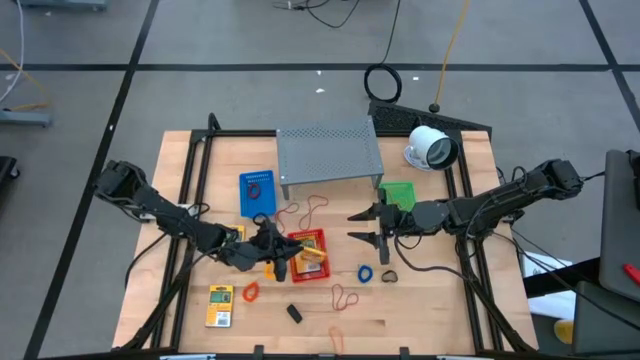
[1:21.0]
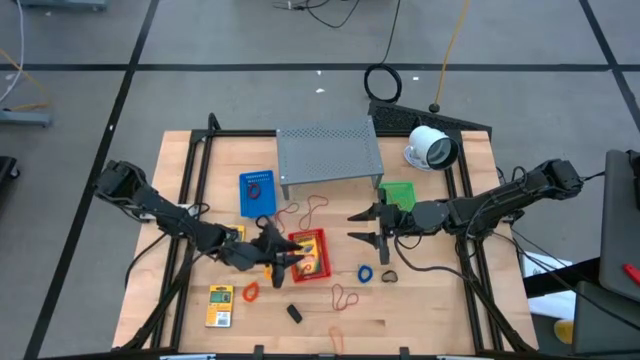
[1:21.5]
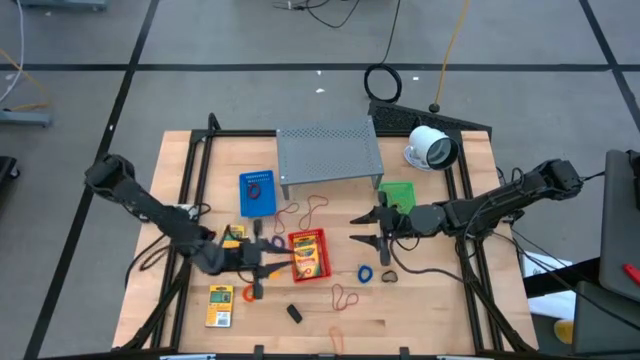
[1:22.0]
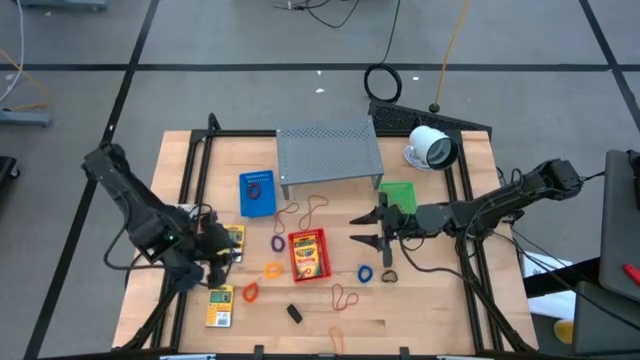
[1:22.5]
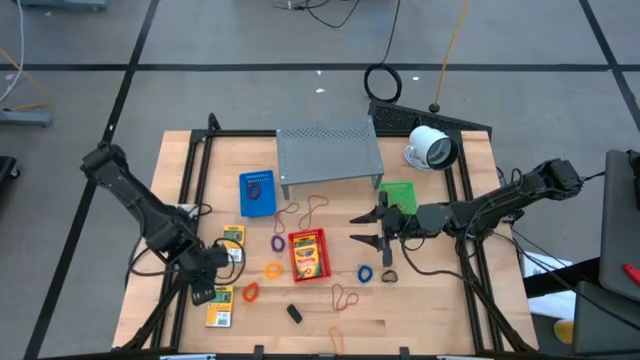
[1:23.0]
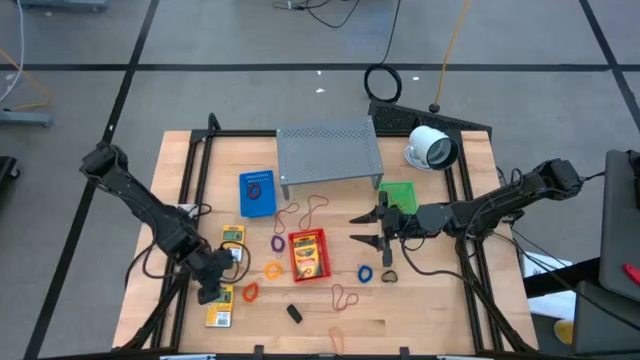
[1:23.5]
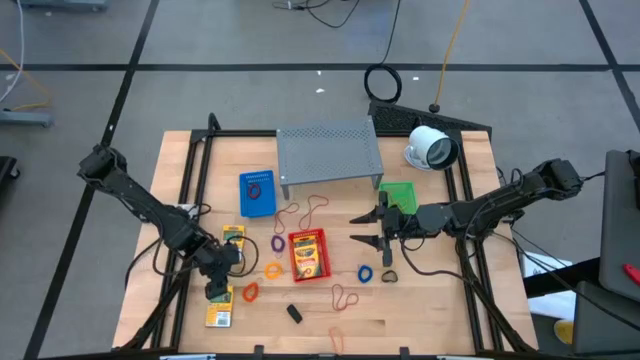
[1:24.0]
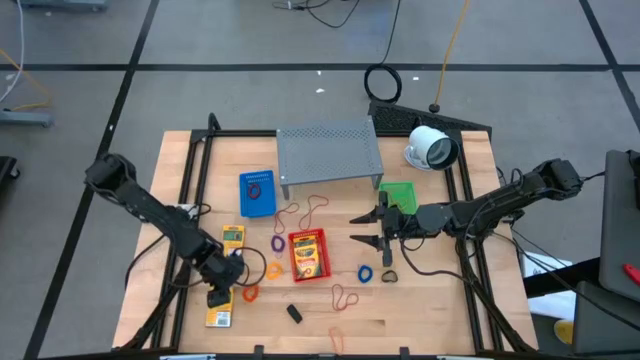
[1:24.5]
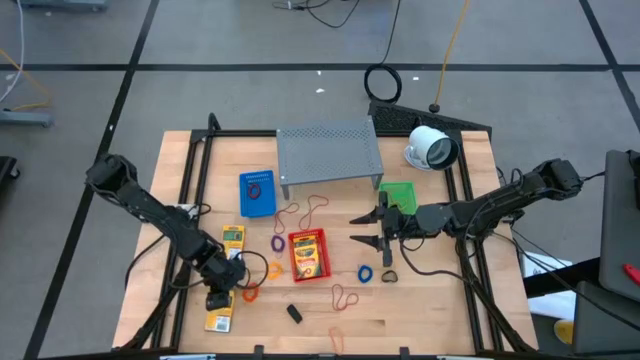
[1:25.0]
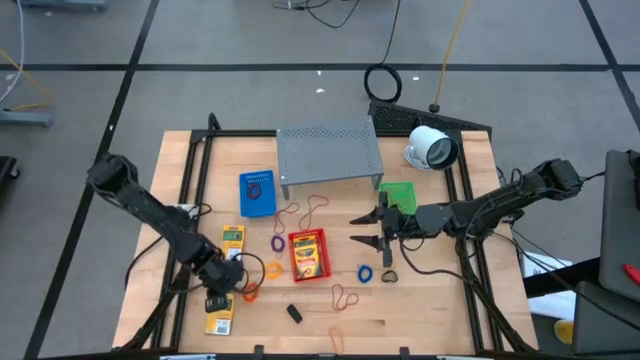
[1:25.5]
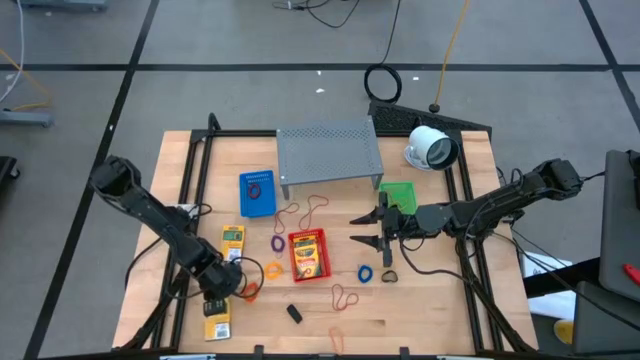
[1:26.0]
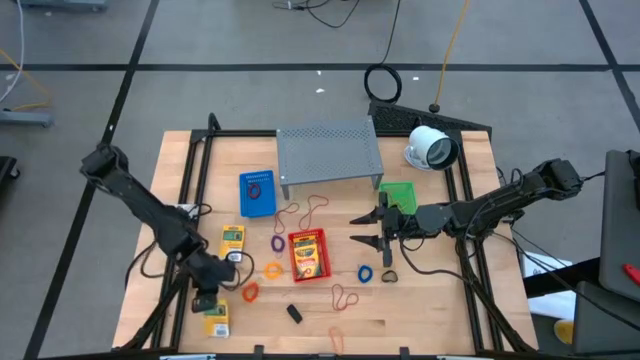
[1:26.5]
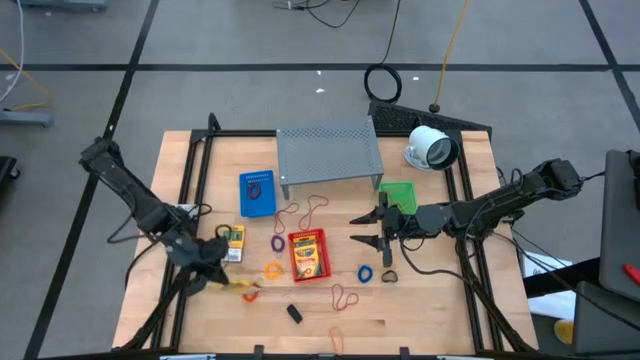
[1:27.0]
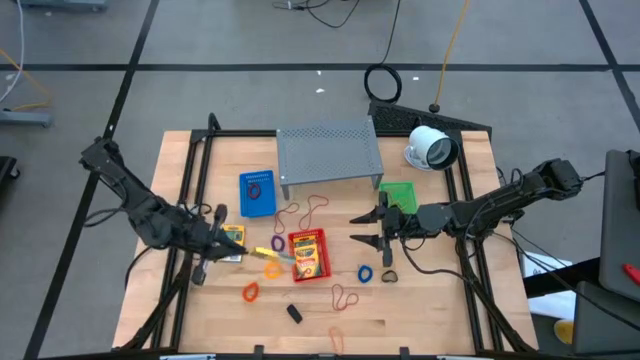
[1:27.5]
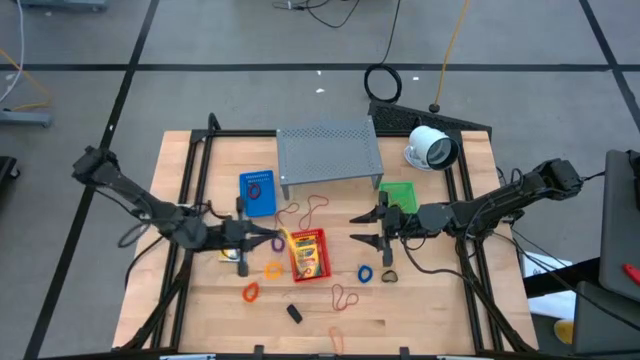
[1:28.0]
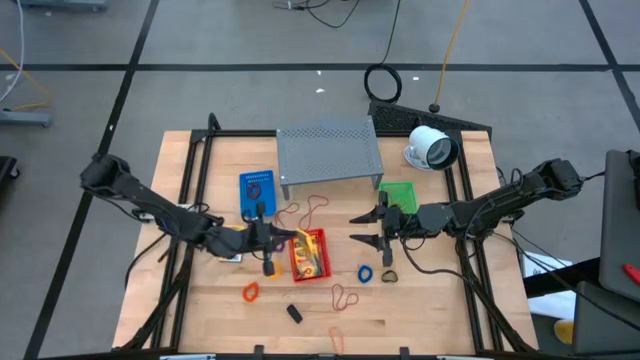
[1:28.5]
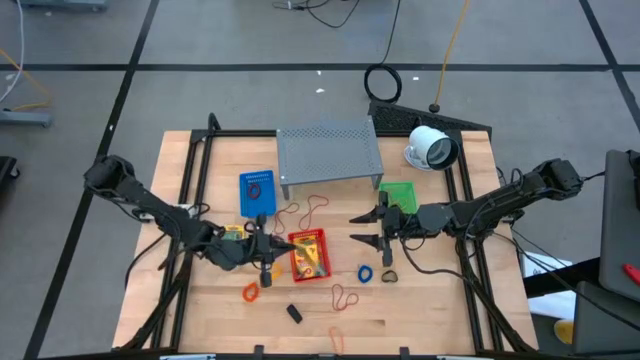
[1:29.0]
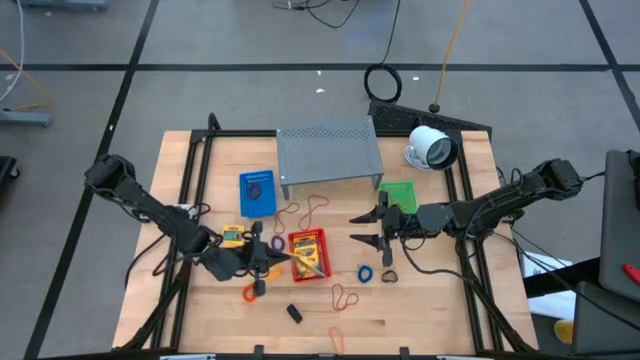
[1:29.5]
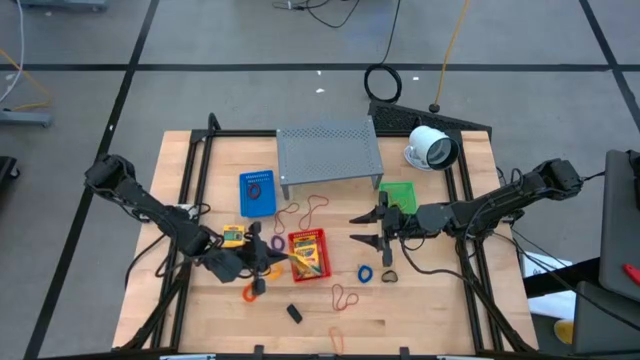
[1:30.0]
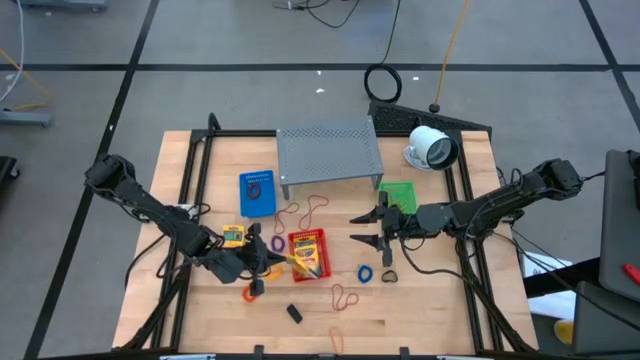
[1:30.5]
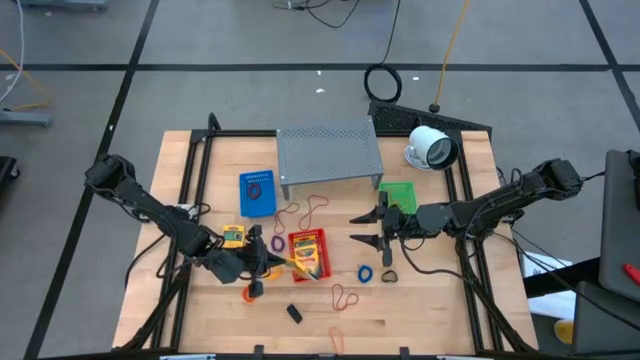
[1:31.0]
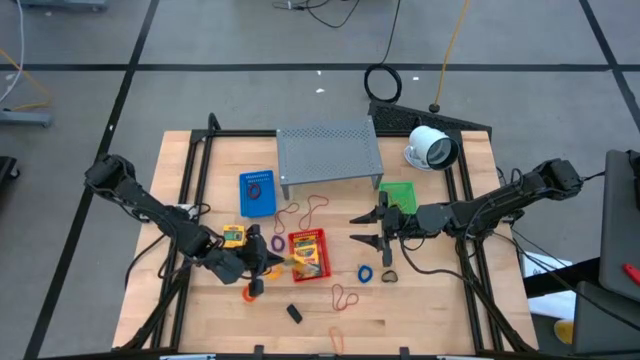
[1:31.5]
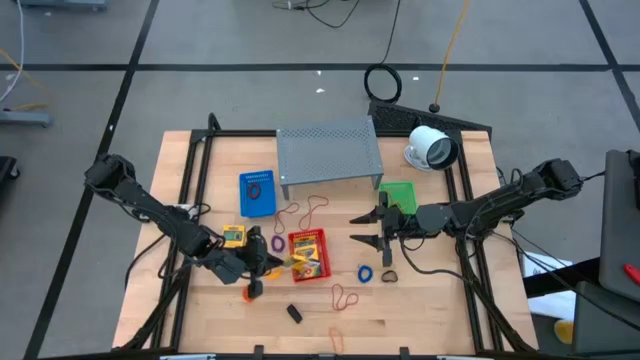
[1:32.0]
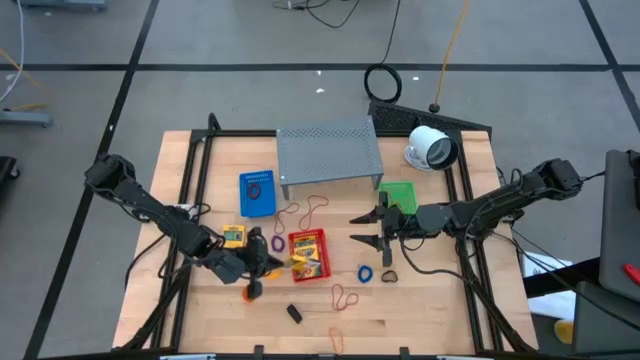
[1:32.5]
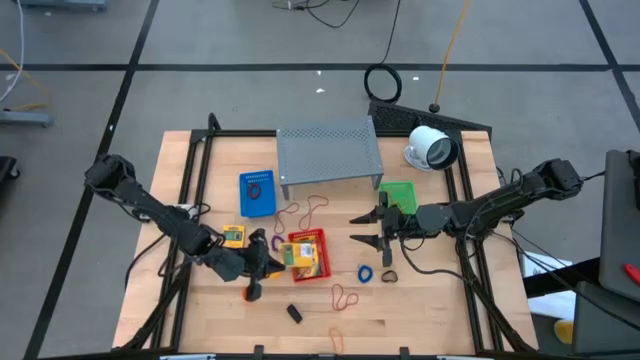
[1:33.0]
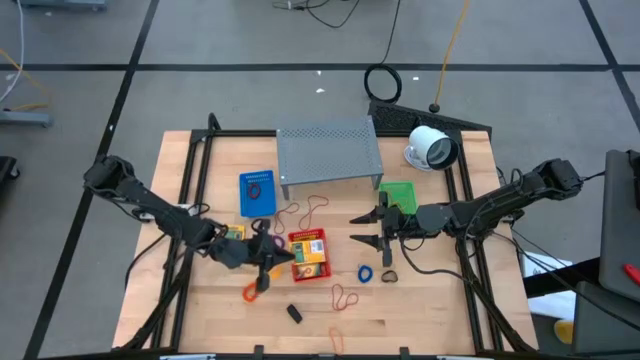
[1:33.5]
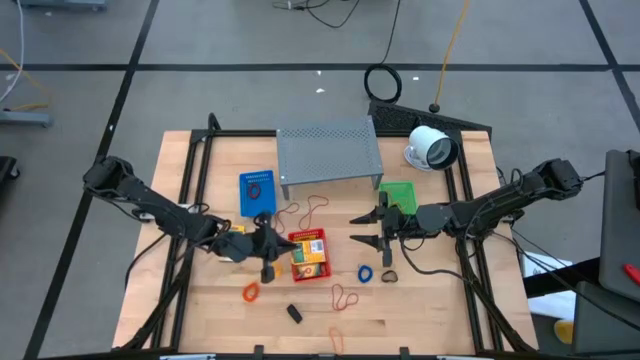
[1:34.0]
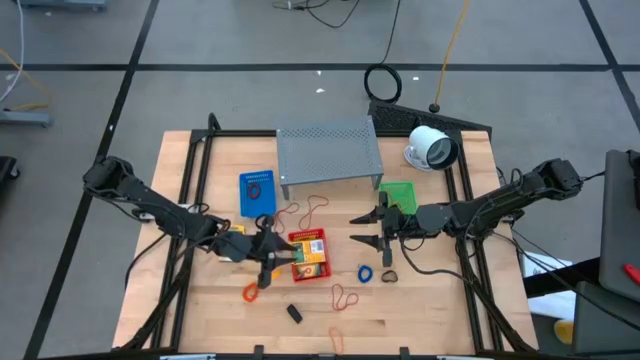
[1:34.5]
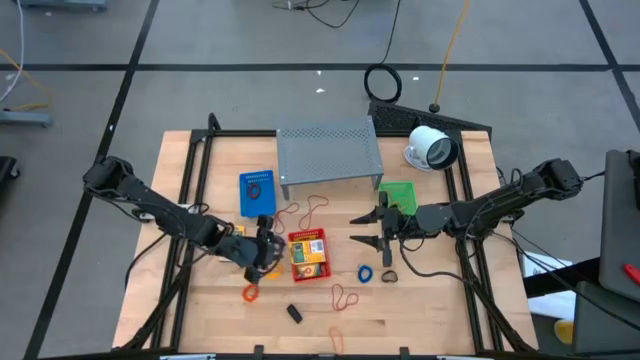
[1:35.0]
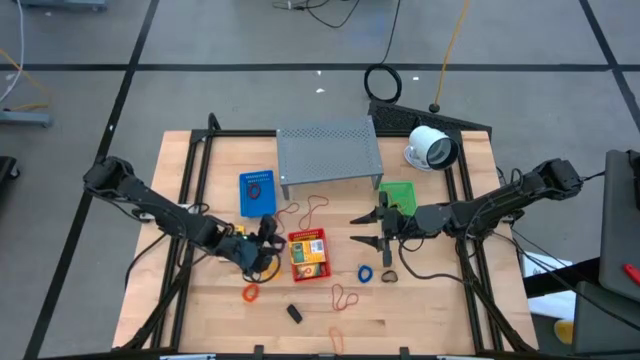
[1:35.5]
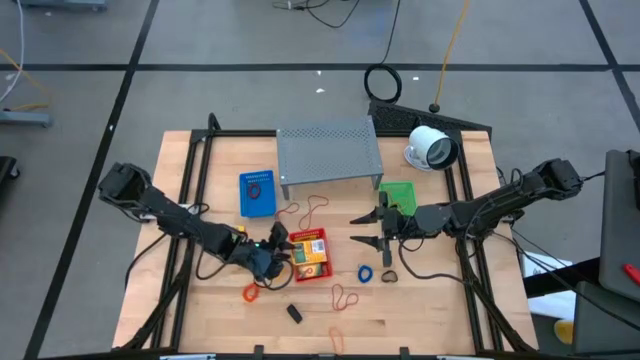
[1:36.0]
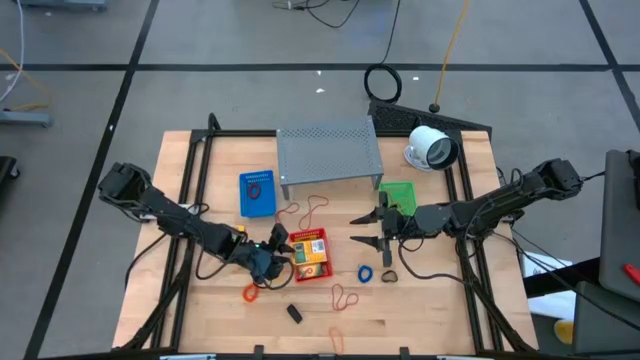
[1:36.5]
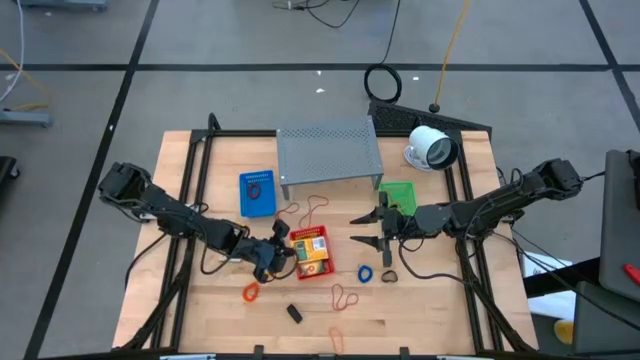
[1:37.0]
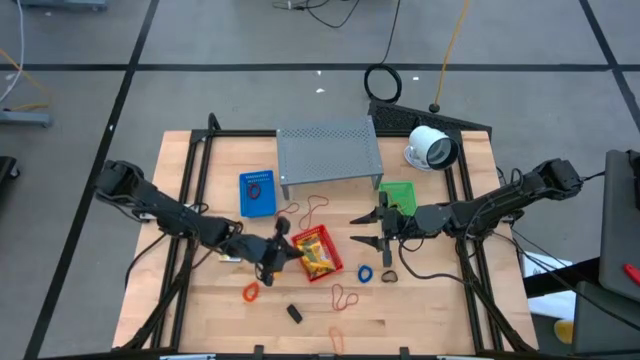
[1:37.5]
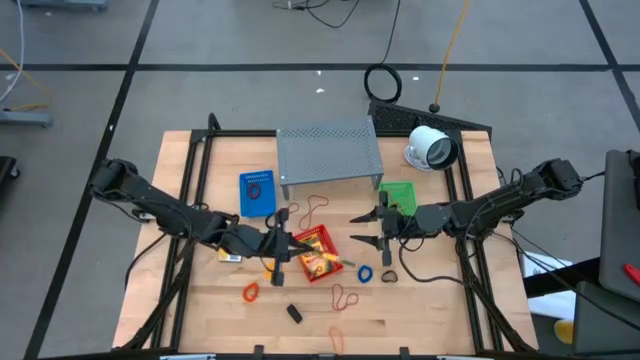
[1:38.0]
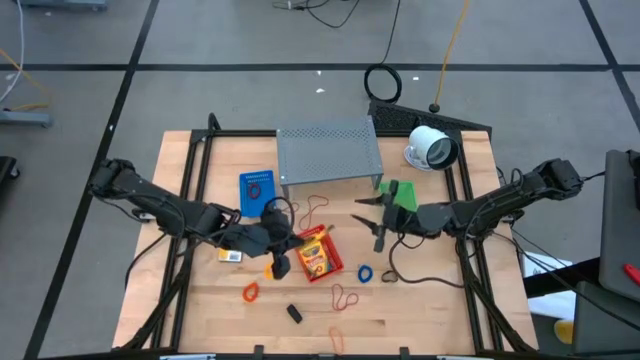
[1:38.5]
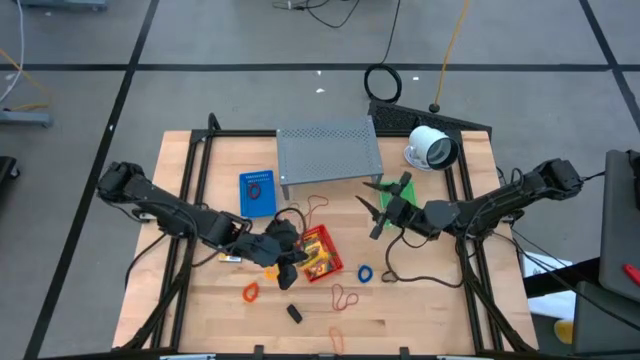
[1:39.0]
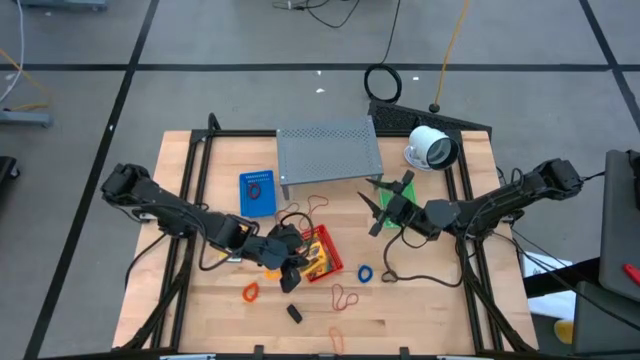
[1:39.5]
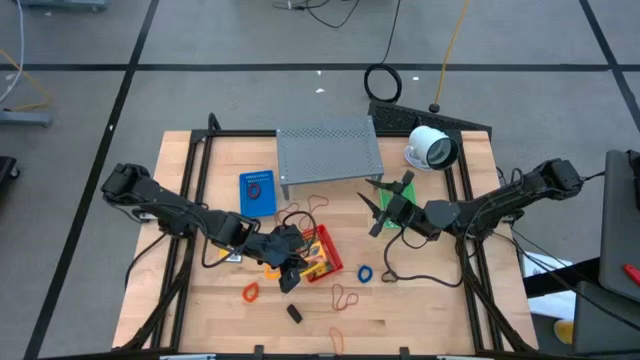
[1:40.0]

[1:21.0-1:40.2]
Task: Pick & Place Office Desk Supplies
Put the bottom yellow crayon box into the red bin

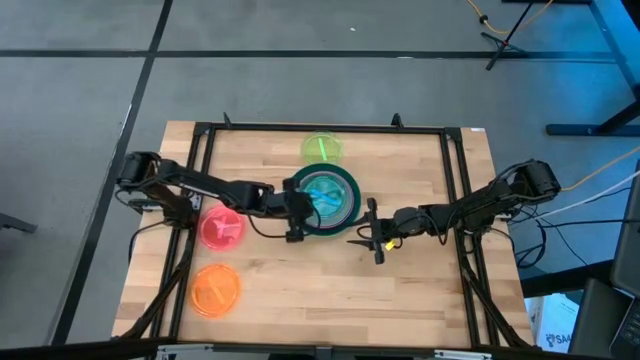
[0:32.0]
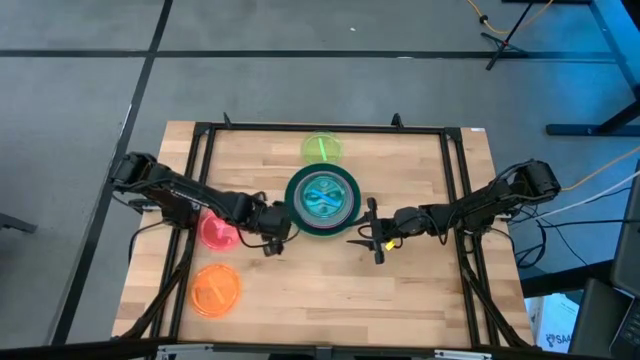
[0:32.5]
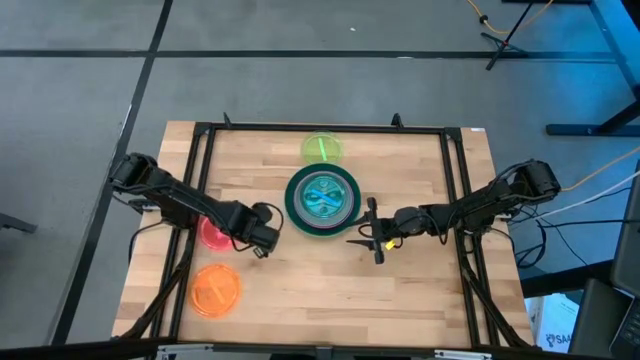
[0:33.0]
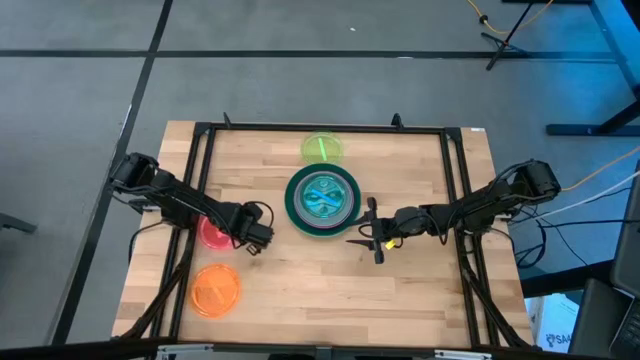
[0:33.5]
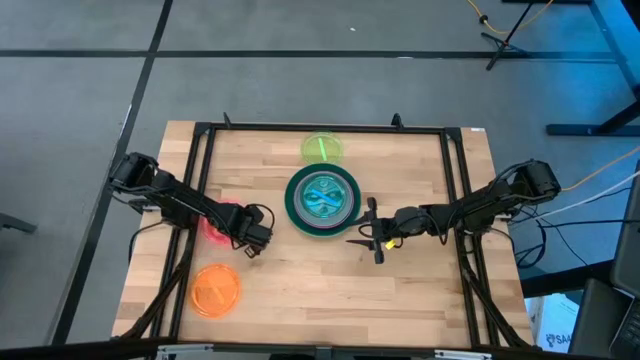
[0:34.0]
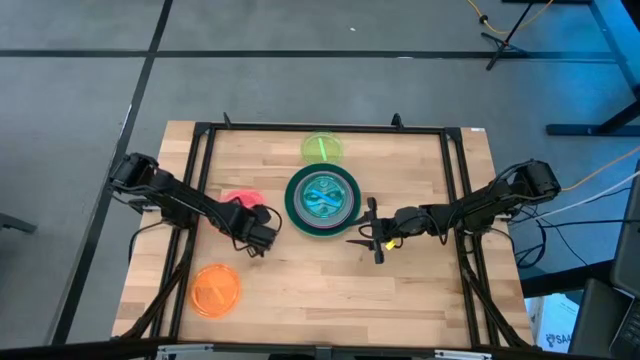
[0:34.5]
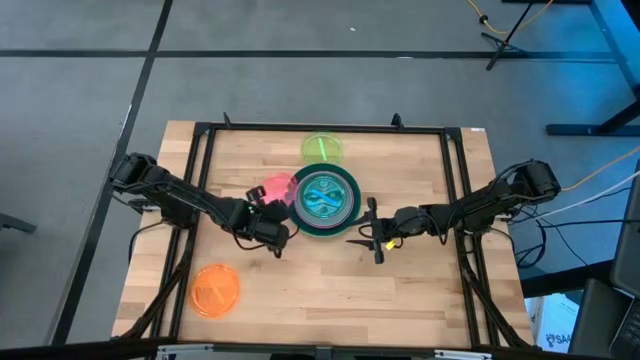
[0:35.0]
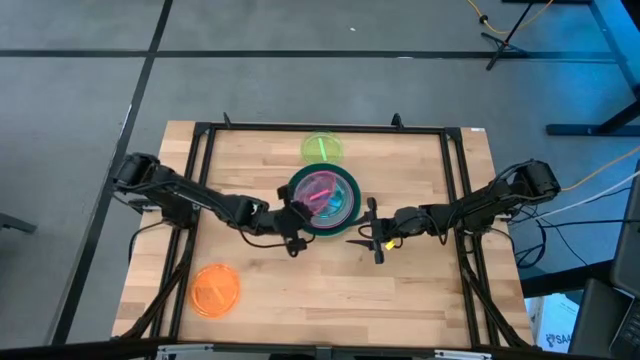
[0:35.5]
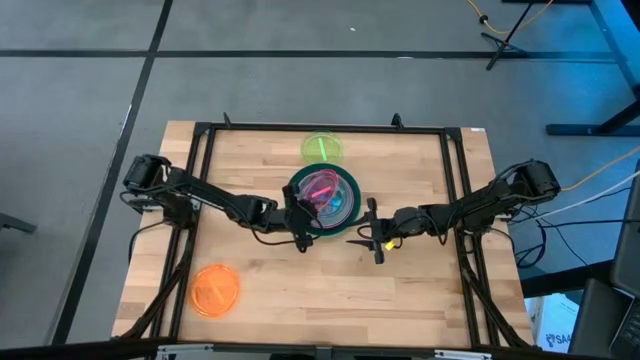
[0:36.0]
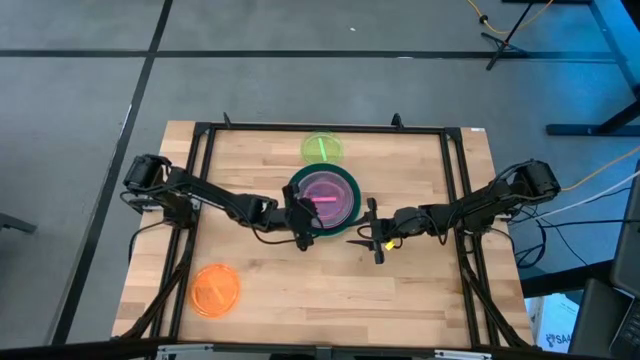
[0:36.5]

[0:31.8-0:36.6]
Task: Stack plastic plates
Stack the pink plate on top of the blue plate
